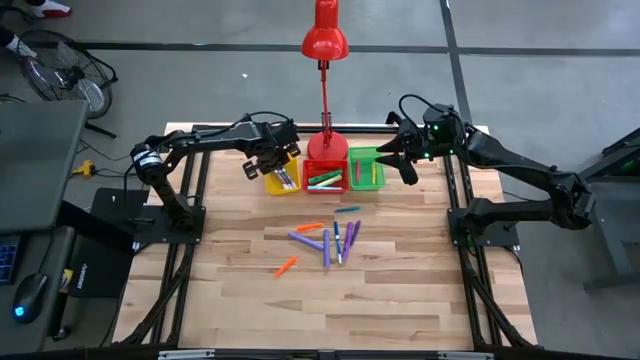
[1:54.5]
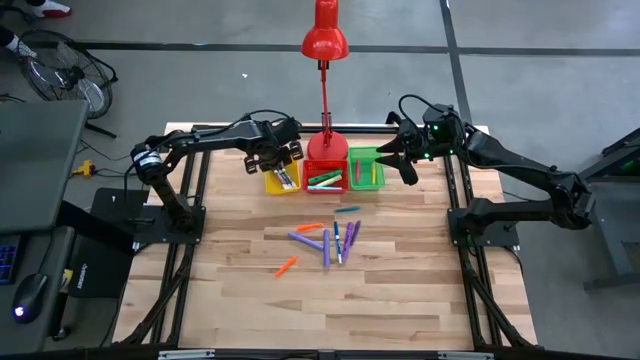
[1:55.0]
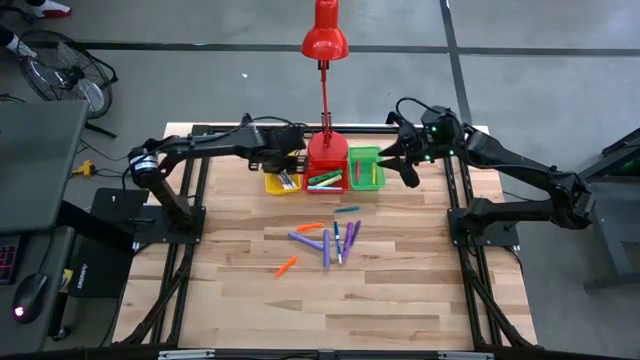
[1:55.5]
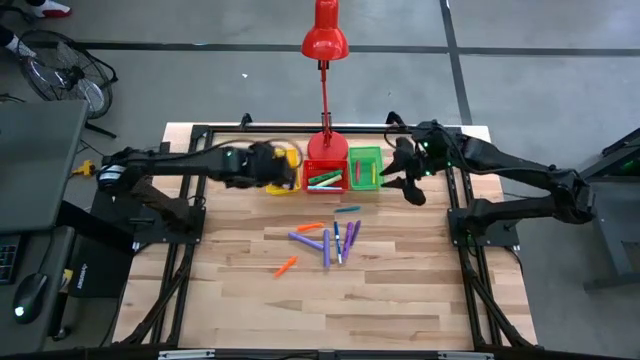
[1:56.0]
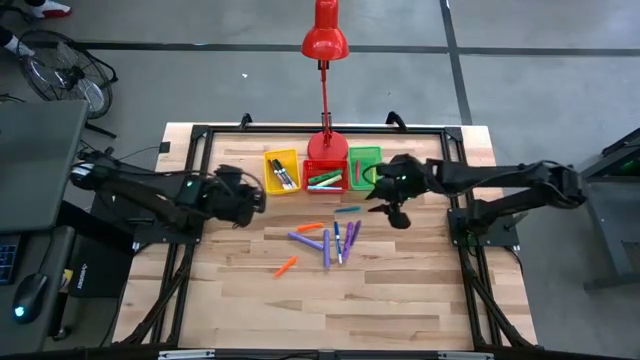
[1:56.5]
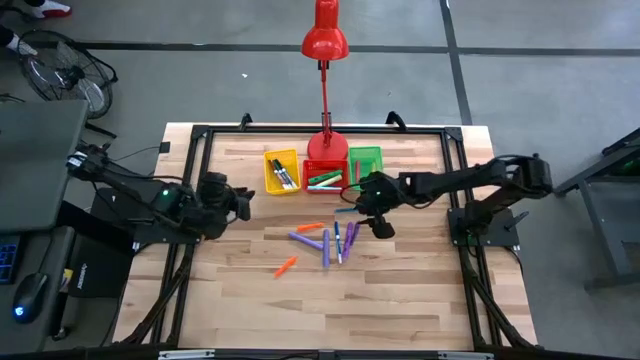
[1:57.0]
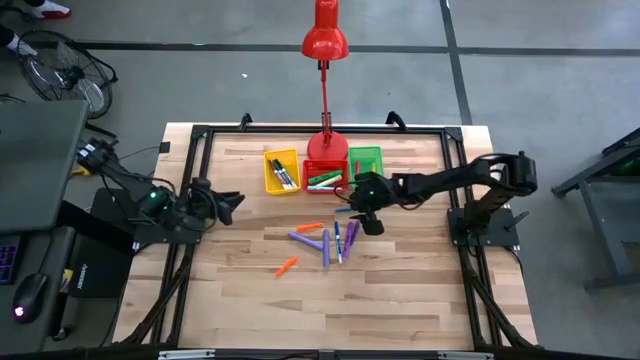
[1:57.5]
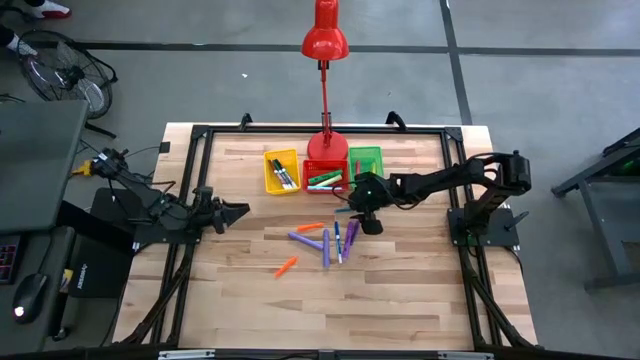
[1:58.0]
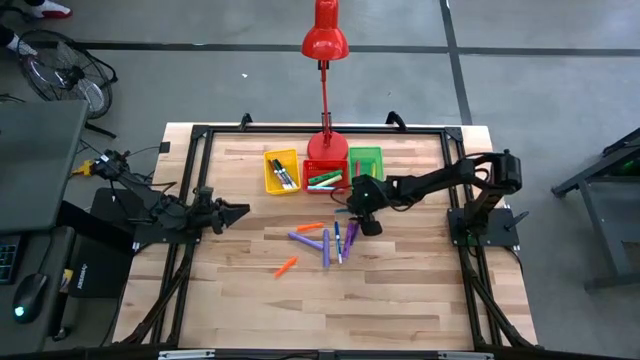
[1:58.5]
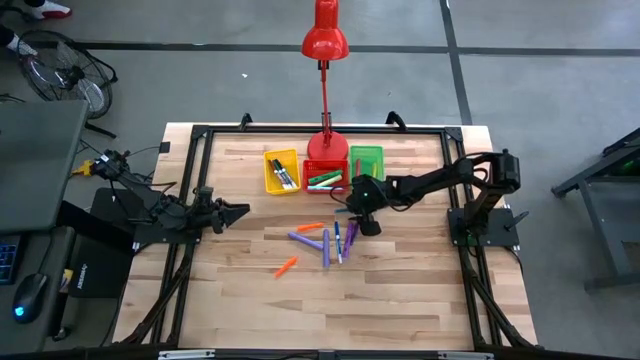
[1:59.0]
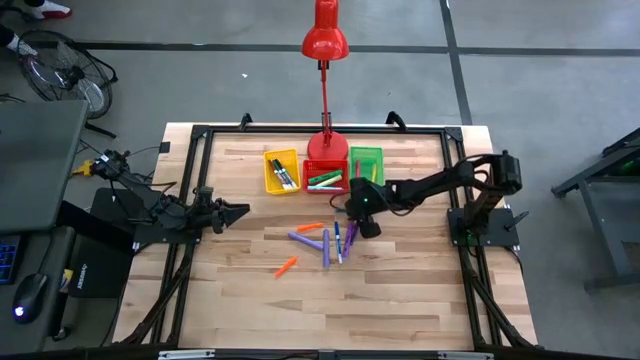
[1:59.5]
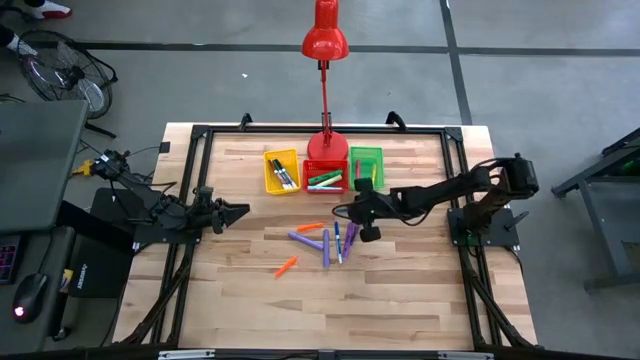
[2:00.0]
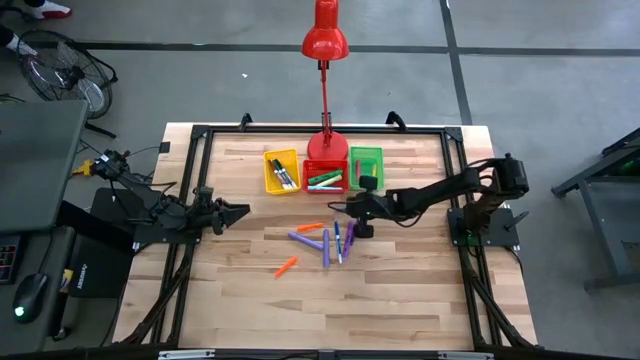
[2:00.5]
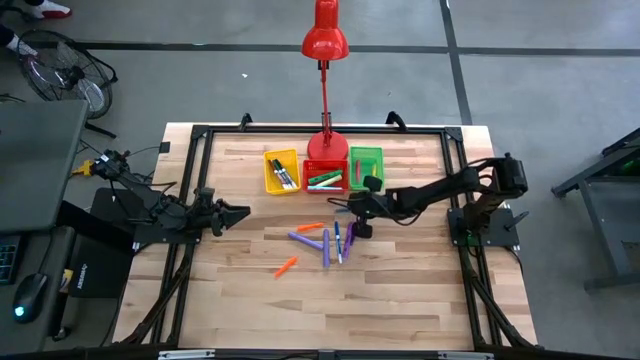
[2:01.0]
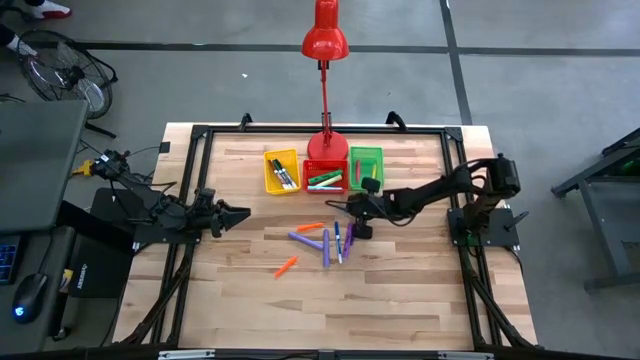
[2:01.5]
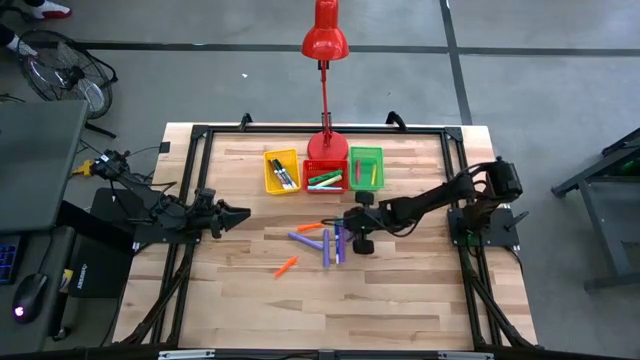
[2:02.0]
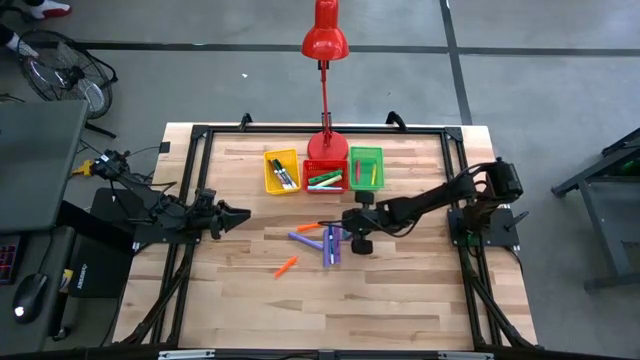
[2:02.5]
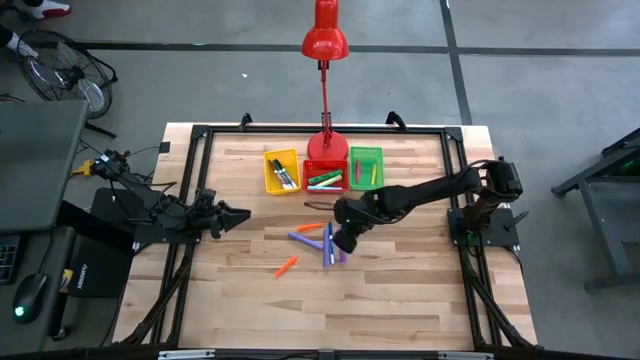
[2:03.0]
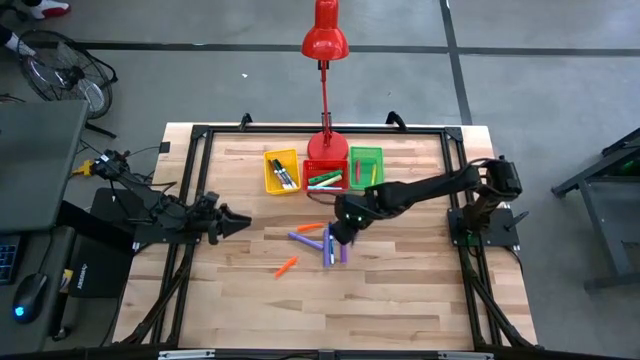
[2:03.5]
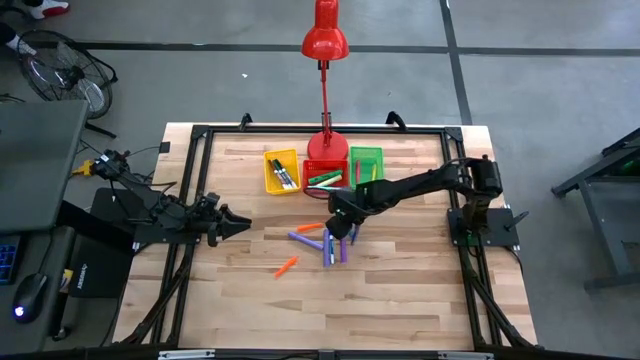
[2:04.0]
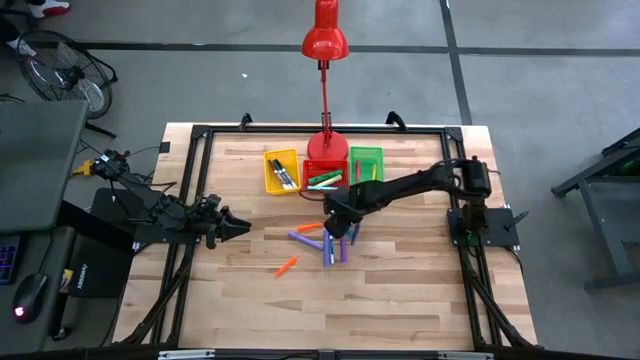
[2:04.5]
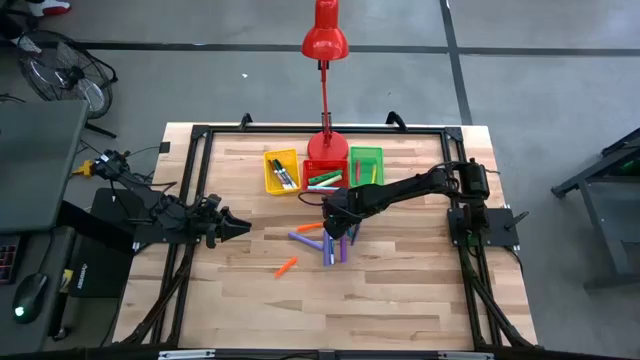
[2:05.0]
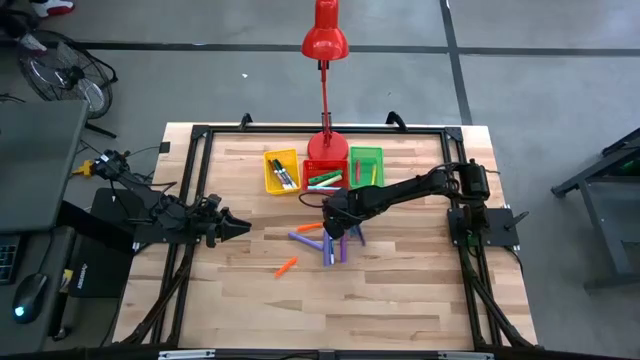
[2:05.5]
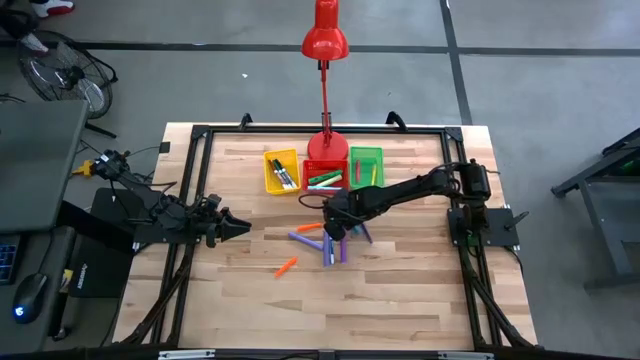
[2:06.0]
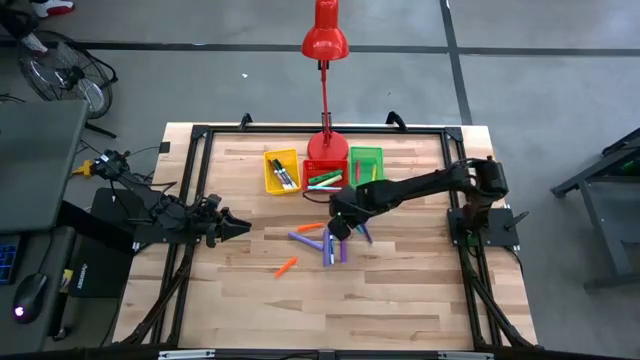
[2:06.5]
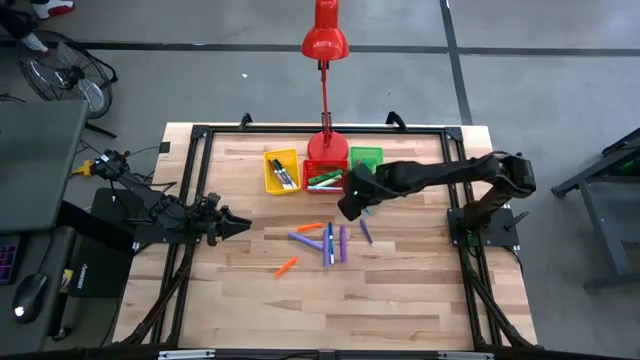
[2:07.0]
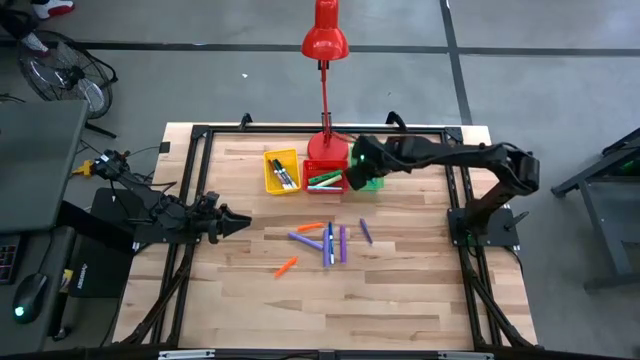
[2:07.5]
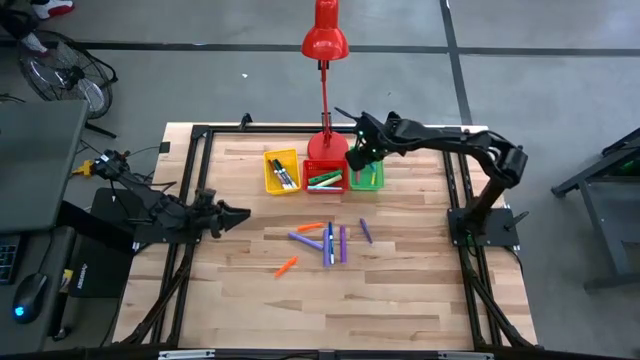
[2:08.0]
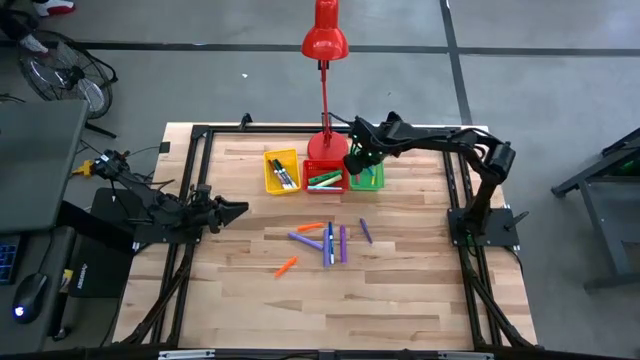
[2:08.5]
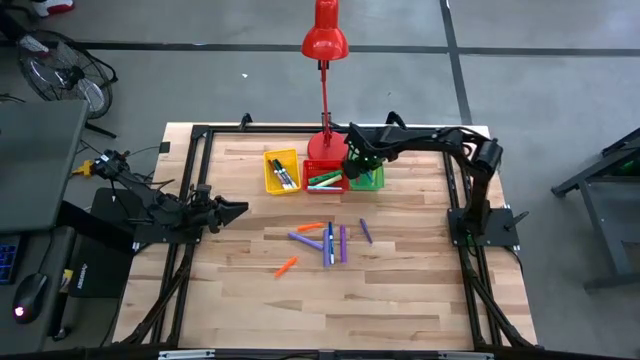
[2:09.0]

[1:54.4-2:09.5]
Task: Pick & Place Markers
Put the blue pen into the green bin

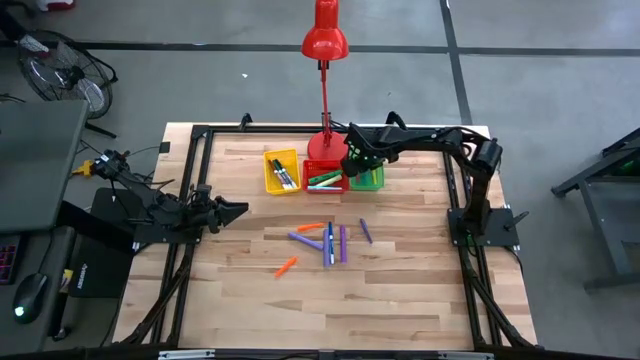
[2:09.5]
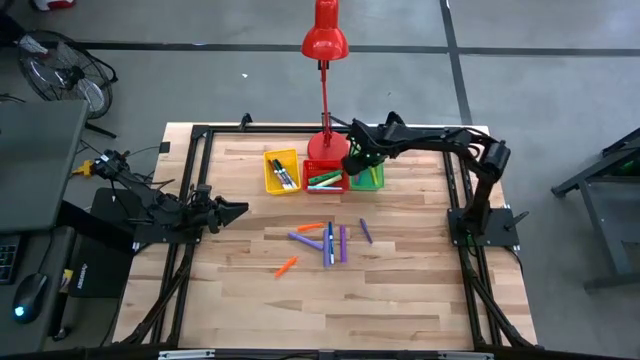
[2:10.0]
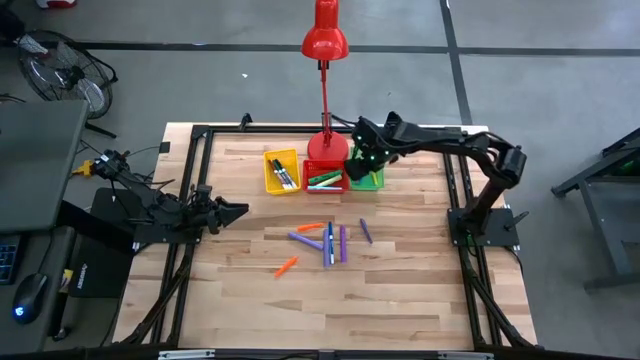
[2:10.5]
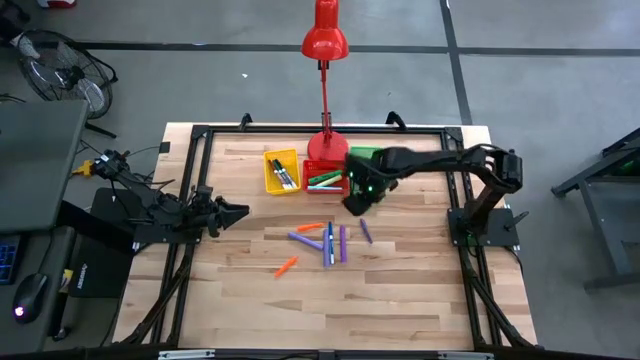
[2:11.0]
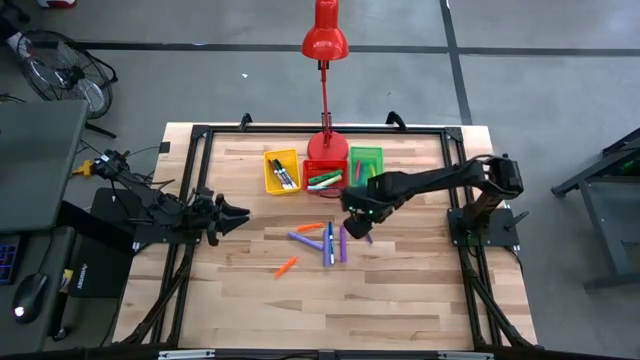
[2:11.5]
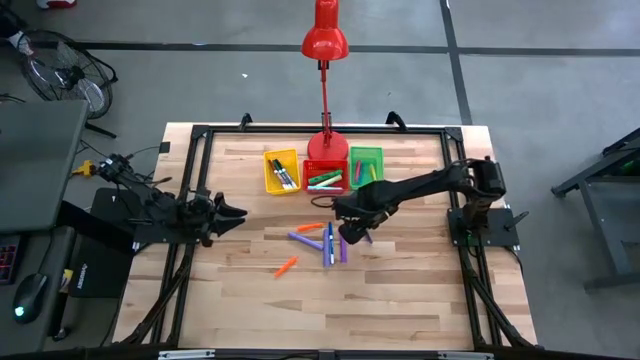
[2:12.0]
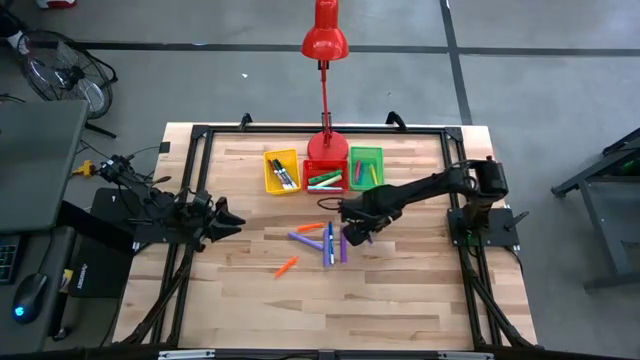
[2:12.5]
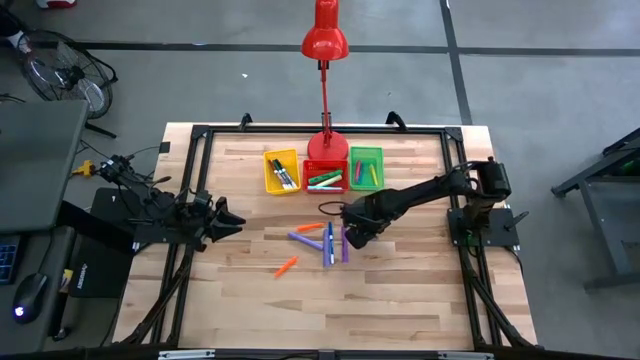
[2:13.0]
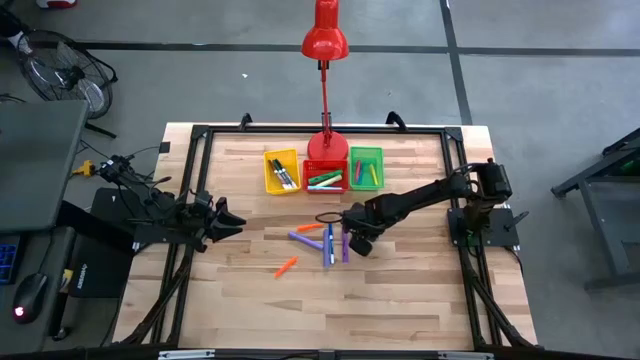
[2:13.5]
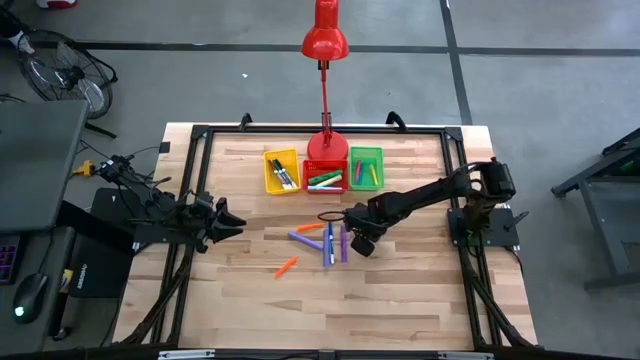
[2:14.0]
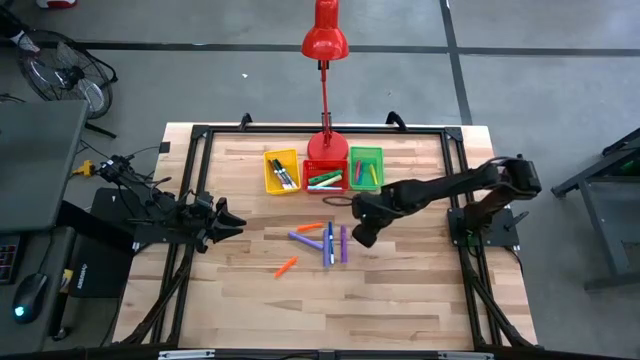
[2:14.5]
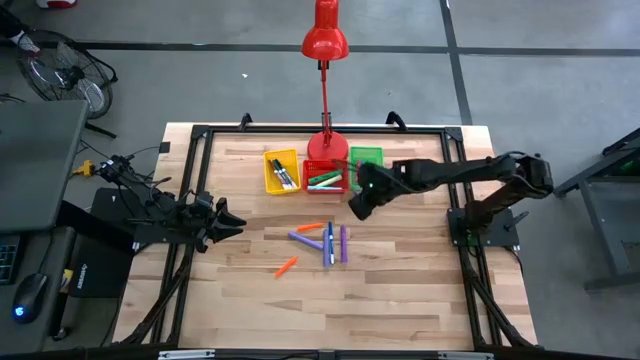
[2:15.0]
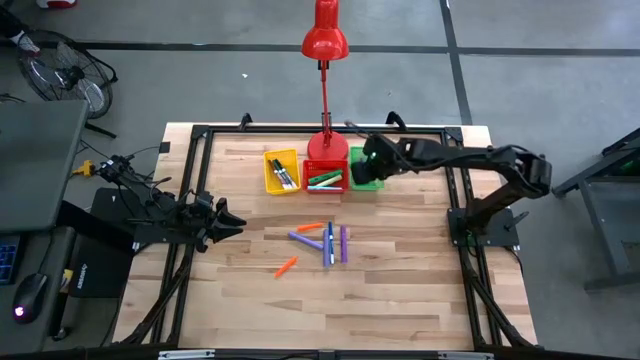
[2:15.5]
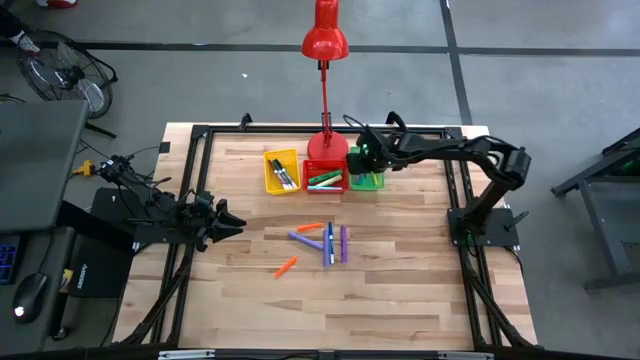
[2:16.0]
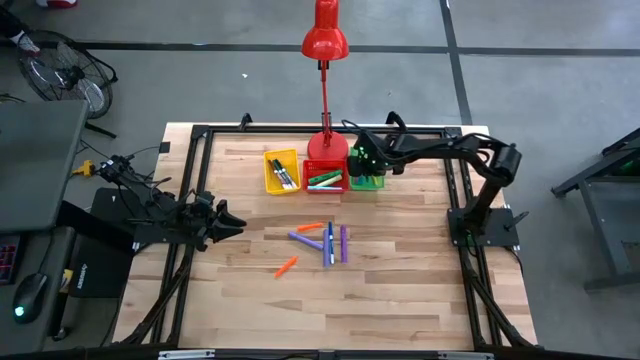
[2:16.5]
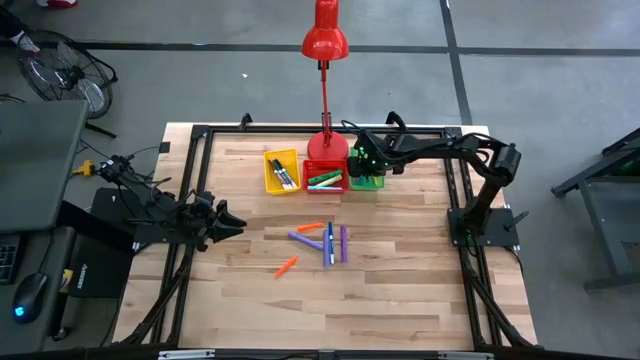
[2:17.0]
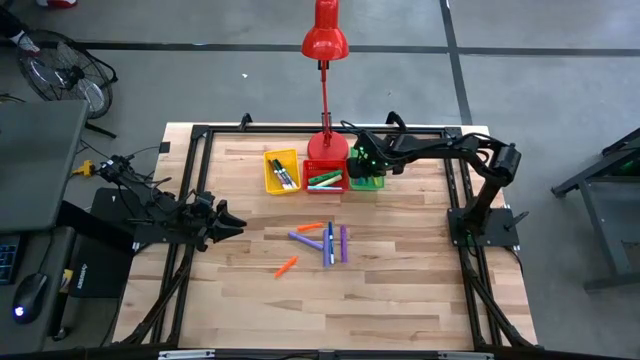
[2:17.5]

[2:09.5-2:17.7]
Put the violet pen into the green bin
